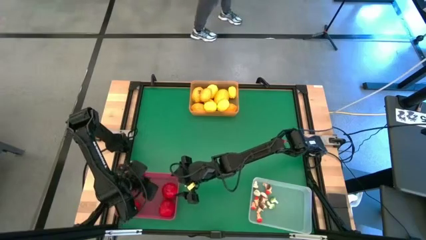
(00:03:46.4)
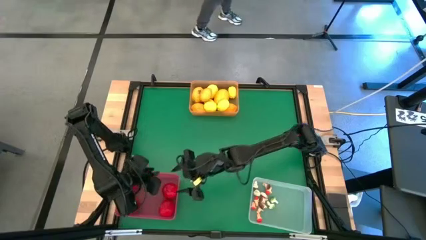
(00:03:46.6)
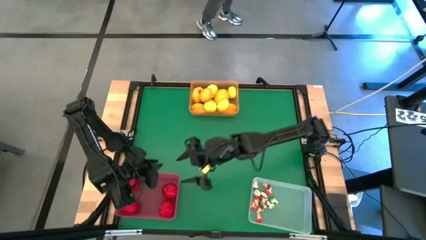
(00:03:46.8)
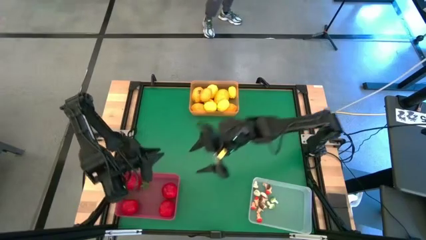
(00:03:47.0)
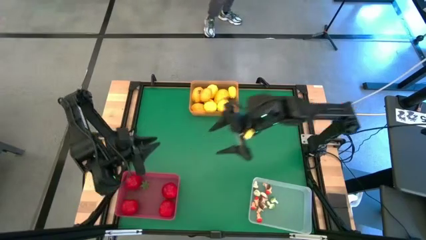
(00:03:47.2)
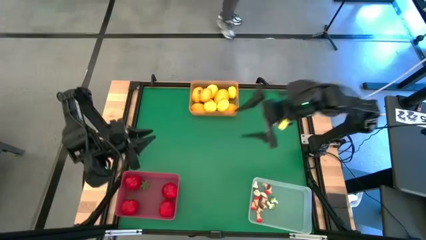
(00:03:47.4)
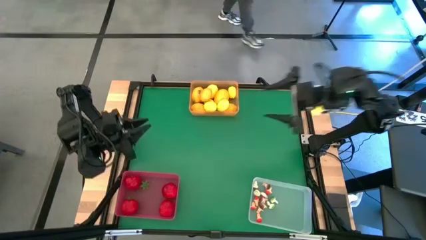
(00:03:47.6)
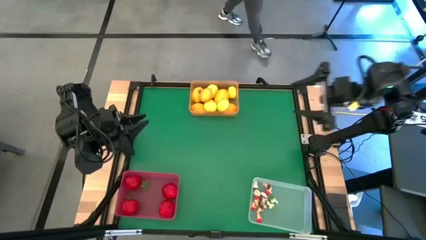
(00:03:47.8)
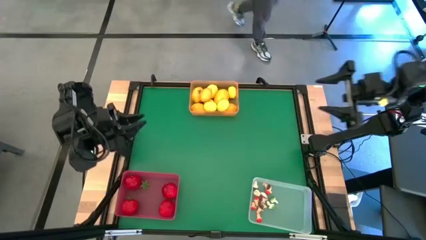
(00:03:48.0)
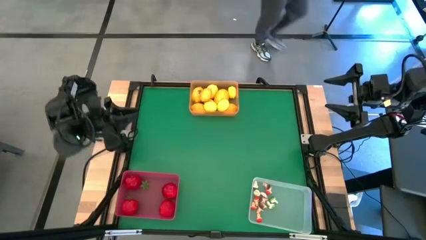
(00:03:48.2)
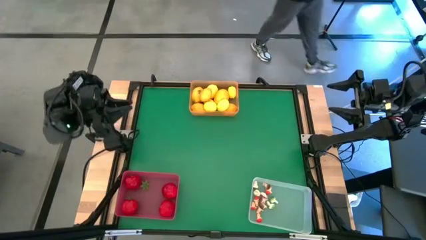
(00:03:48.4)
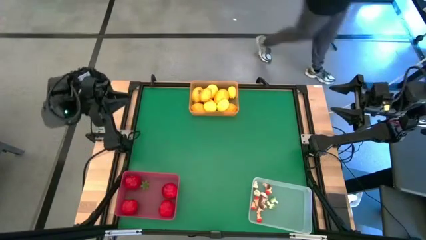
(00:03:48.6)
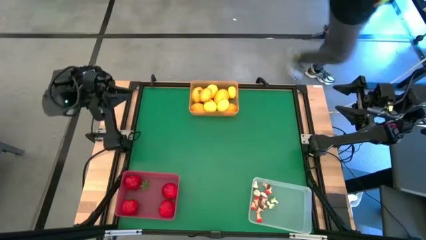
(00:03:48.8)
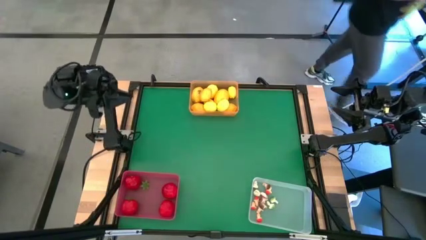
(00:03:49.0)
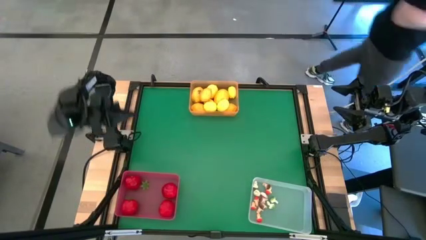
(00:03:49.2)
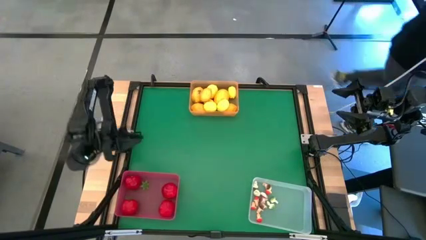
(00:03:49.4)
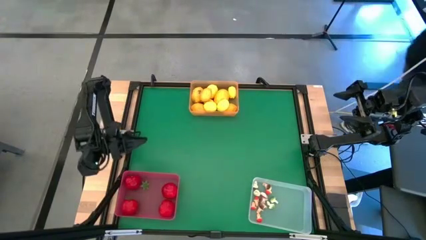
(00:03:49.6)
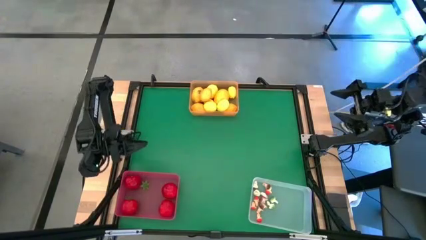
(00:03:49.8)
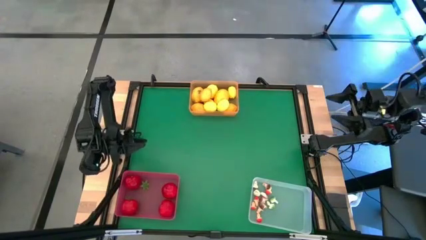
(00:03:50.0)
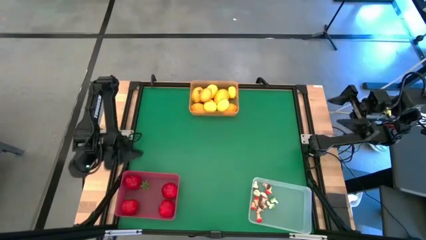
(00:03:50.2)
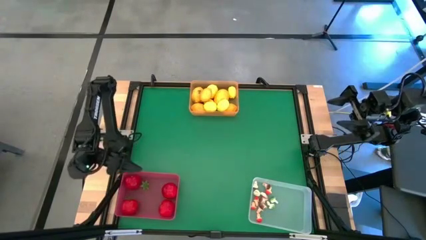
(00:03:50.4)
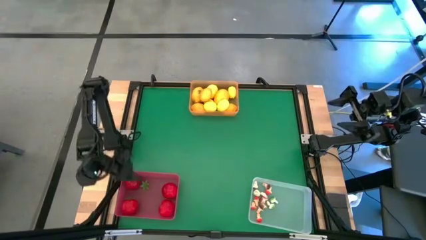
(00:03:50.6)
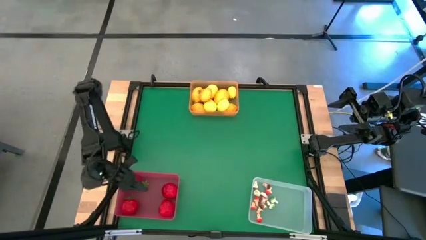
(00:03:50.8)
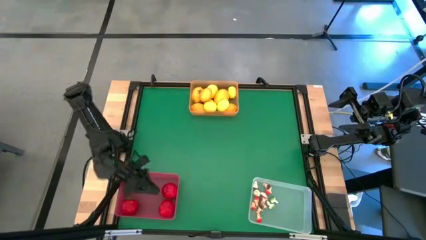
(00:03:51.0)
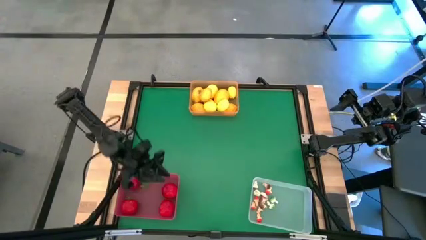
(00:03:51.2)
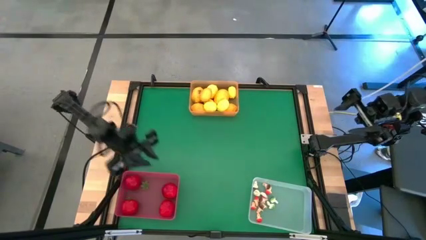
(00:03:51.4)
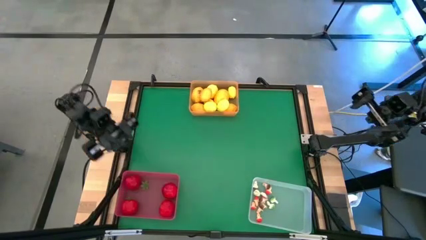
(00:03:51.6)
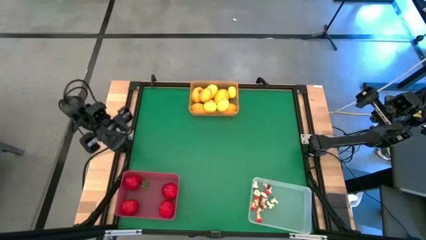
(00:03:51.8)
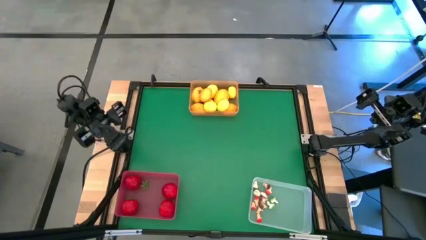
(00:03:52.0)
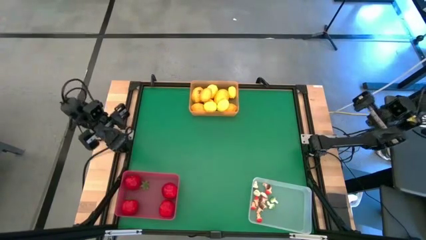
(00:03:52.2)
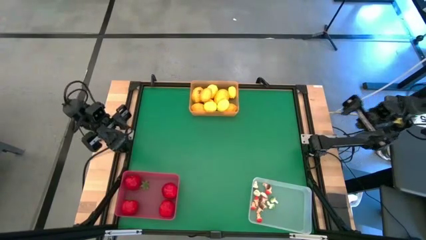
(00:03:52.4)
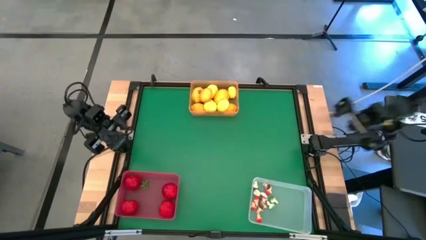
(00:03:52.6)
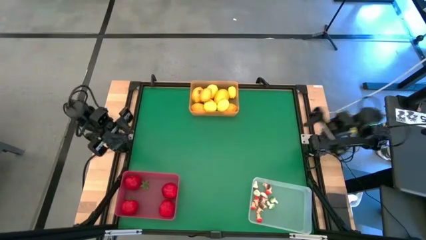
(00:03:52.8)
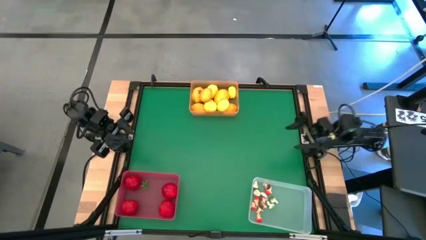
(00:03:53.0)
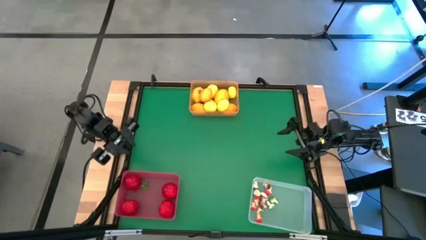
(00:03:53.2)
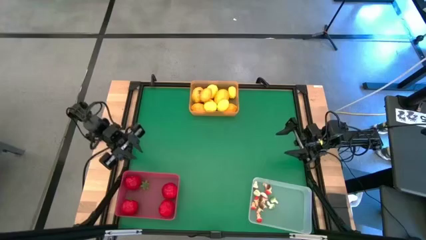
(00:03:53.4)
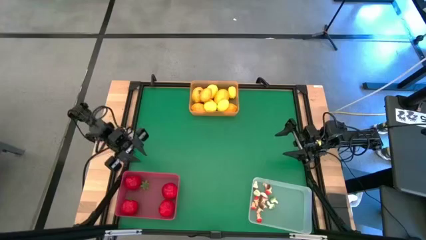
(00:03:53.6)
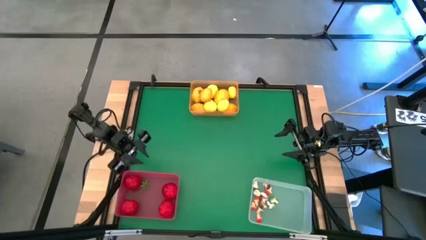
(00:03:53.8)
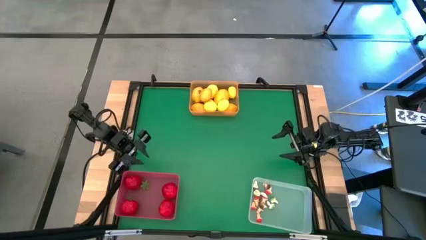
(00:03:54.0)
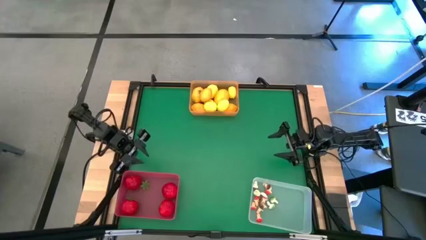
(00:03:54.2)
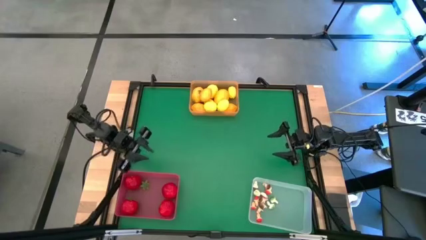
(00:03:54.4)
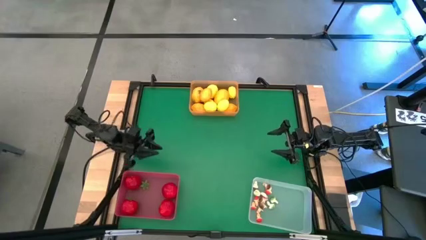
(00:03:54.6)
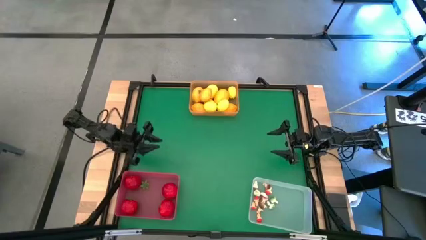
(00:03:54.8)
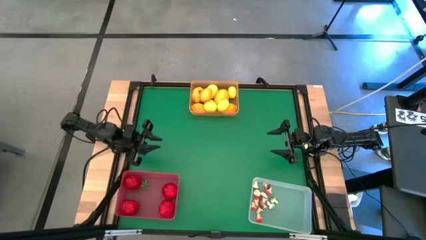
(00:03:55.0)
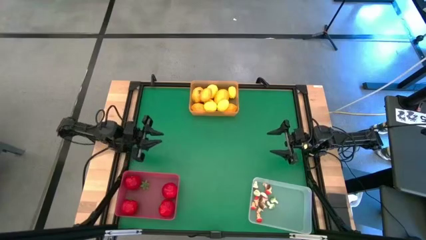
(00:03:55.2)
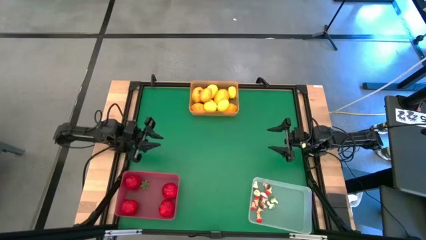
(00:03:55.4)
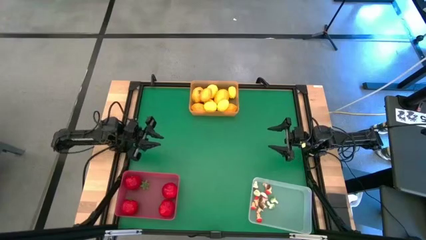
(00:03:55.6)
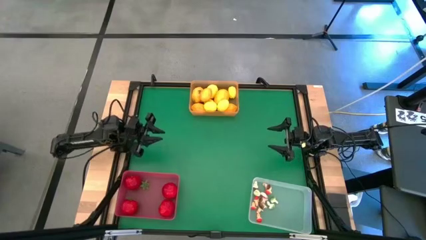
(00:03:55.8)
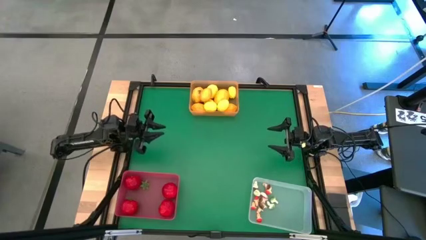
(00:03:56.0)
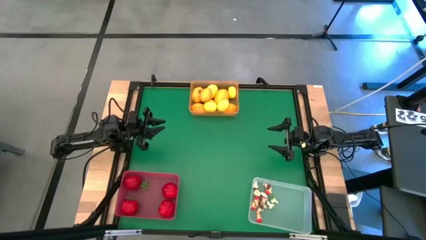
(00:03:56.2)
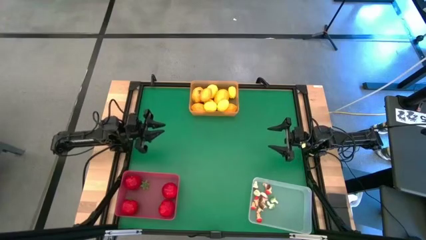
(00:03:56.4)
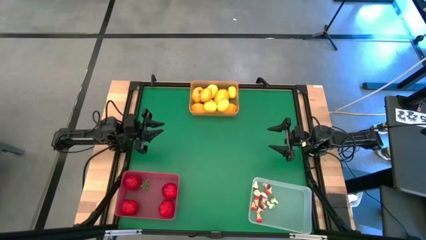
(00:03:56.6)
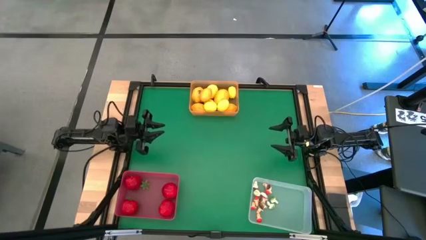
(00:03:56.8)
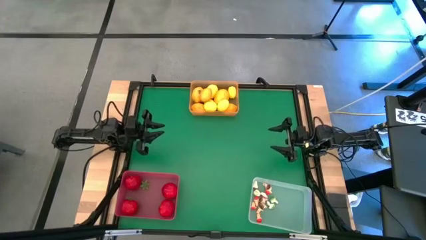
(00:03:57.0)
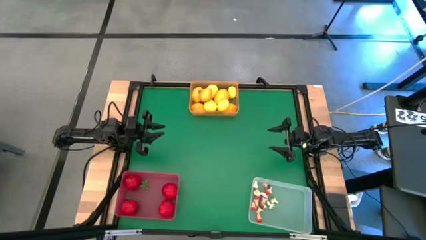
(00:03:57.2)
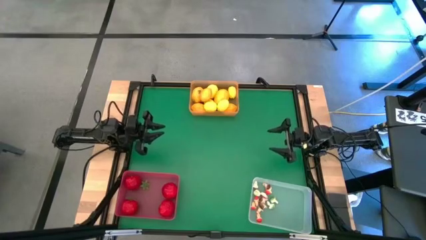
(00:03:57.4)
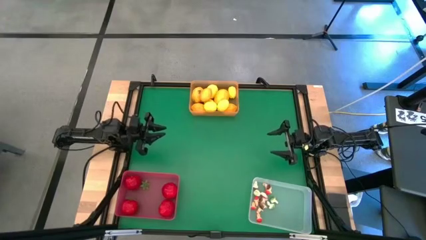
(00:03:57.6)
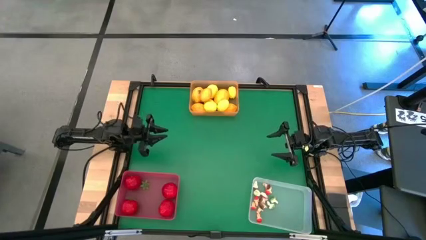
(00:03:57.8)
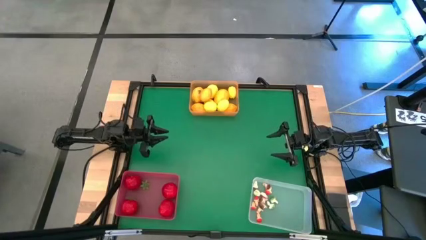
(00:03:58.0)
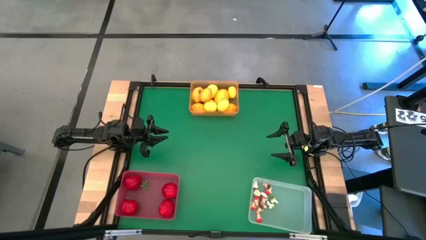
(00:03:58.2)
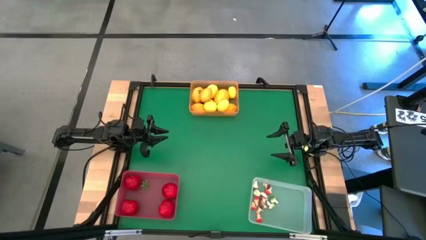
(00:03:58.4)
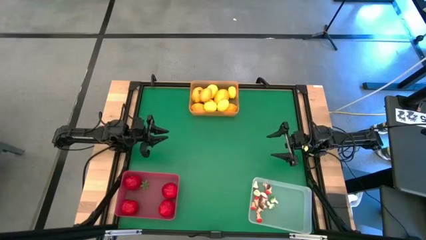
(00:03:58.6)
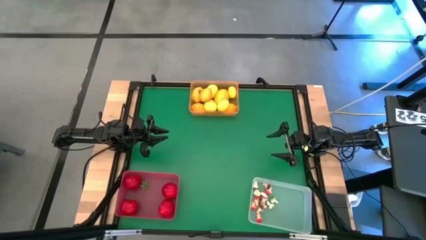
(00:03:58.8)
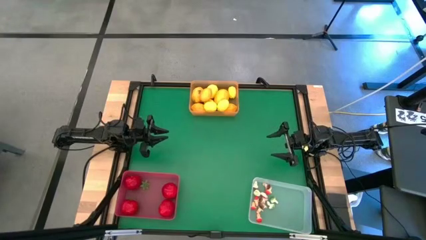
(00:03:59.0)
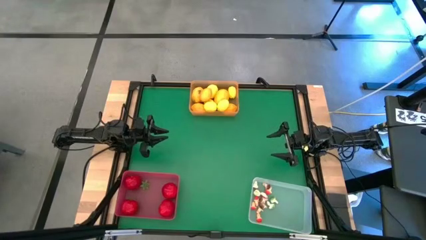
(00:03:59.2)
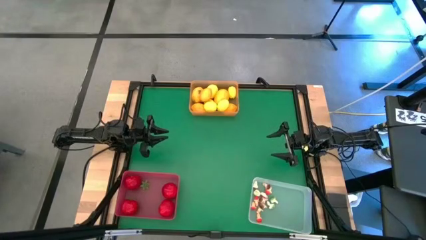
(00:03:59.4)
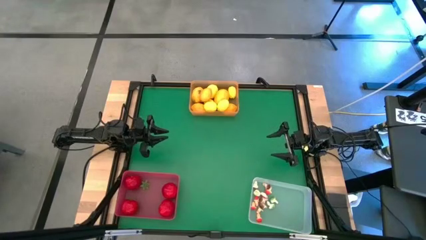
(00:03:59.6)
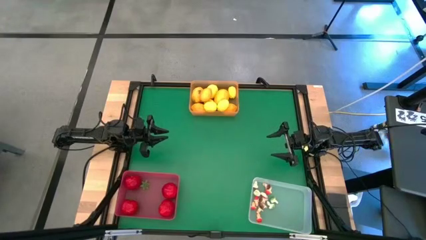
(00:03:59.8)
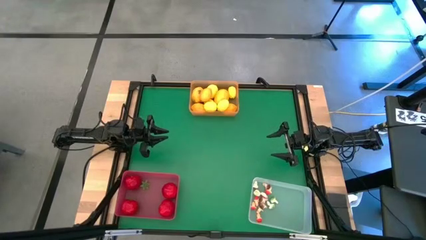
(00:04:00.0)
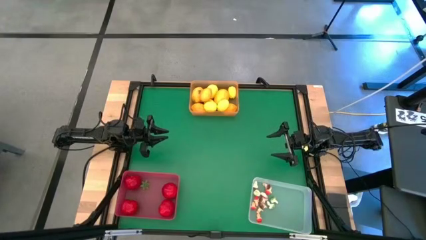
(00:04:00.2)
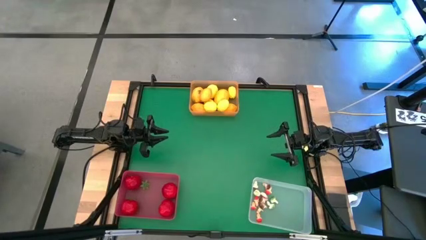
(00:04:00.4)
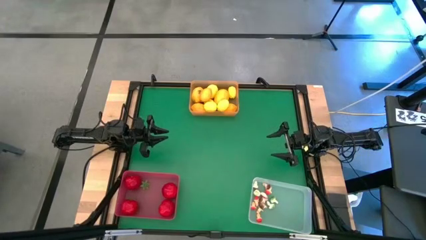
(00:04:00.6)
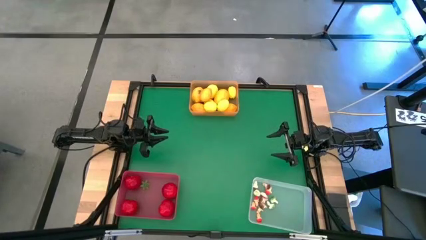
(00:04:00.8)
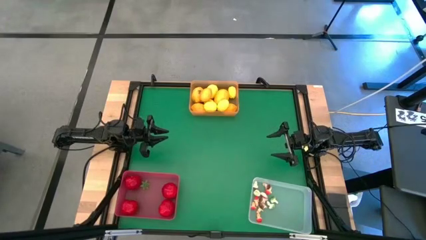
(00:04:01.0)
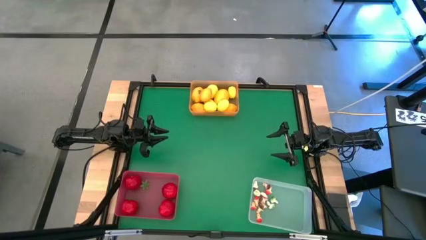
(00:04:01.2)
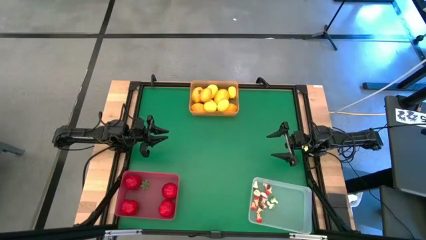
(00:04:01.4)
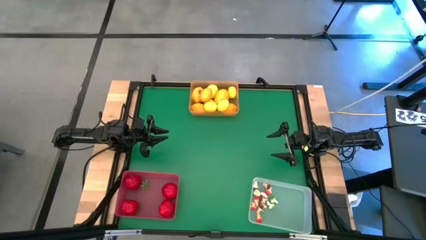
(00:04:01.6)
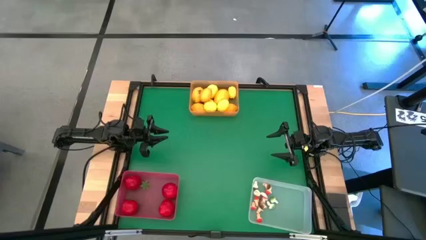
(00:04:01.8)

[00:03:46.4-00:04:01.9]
Task: Sort produce into baskets
Return to Home Position
